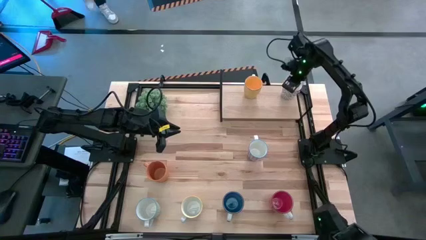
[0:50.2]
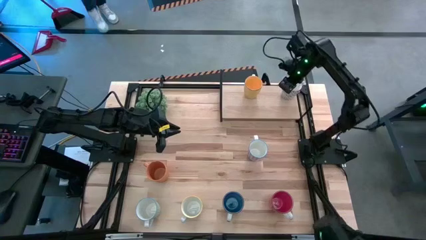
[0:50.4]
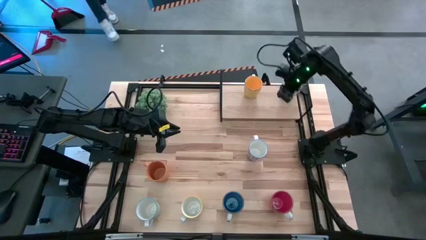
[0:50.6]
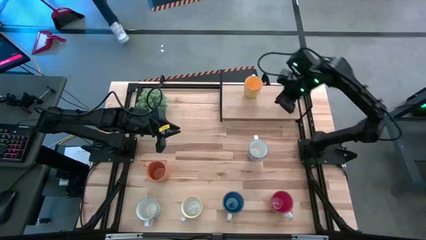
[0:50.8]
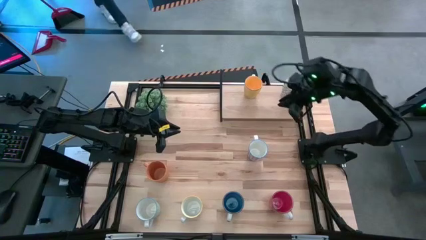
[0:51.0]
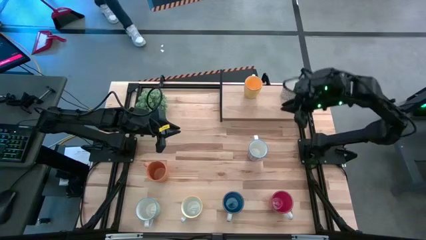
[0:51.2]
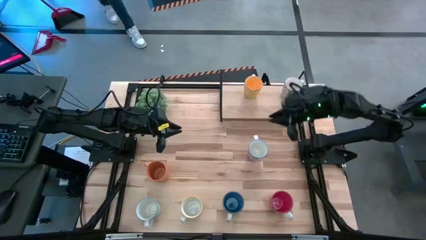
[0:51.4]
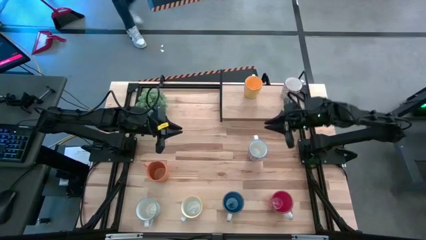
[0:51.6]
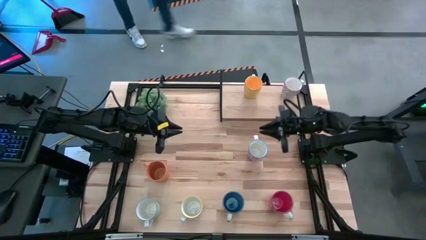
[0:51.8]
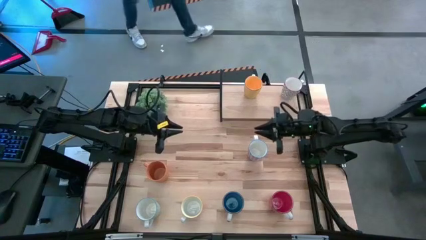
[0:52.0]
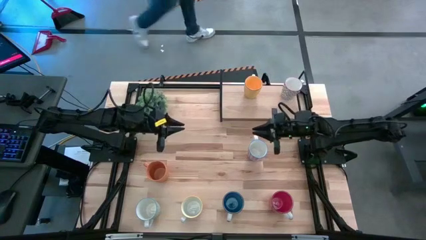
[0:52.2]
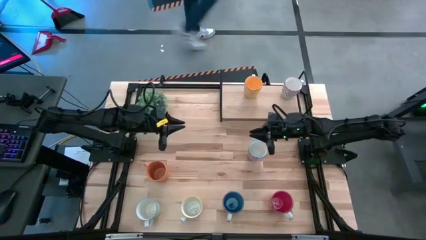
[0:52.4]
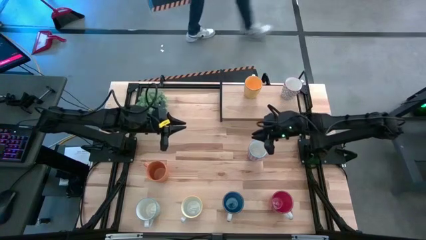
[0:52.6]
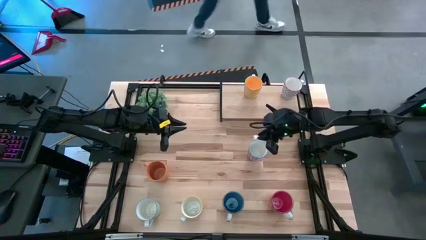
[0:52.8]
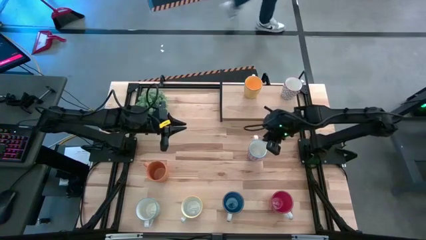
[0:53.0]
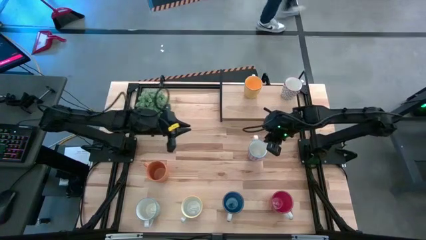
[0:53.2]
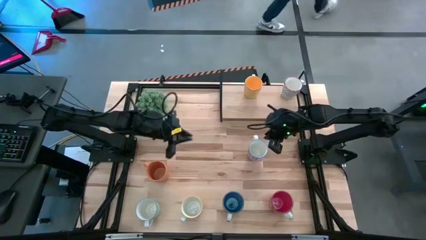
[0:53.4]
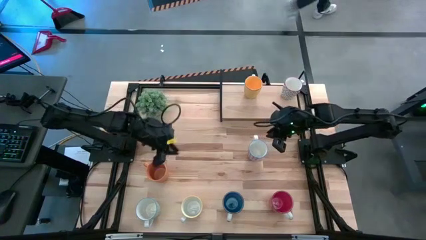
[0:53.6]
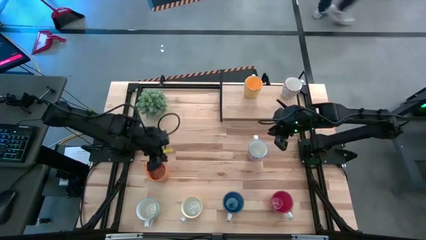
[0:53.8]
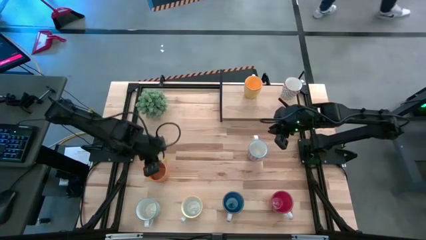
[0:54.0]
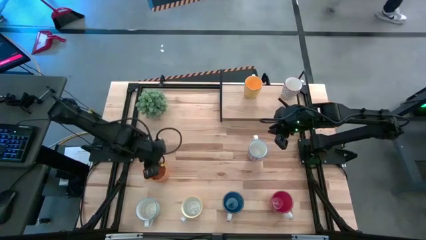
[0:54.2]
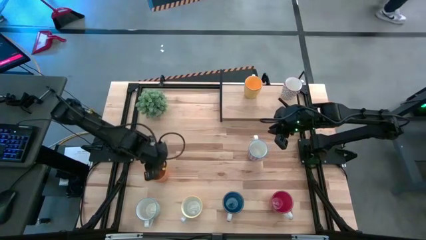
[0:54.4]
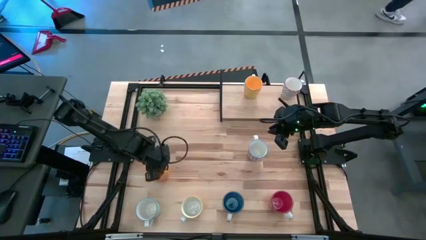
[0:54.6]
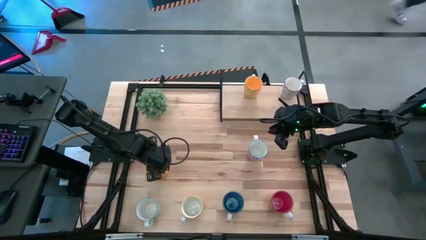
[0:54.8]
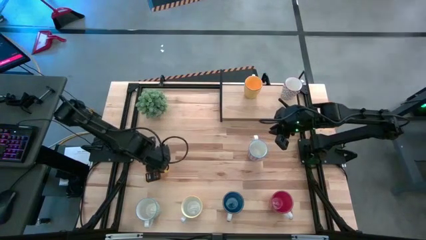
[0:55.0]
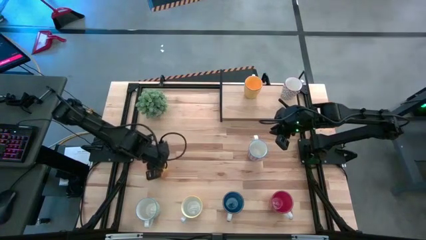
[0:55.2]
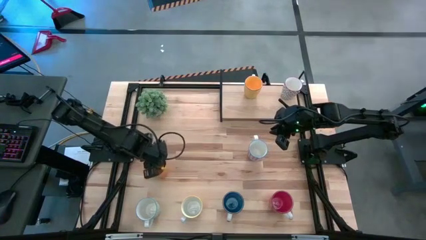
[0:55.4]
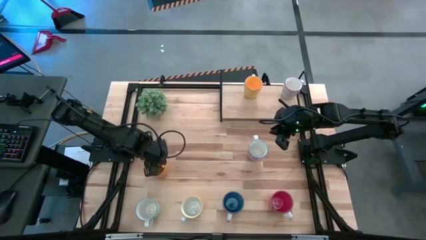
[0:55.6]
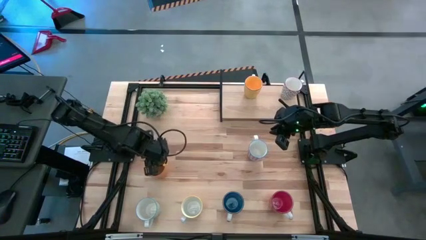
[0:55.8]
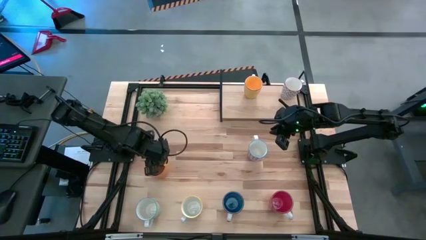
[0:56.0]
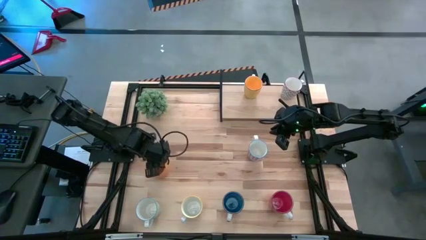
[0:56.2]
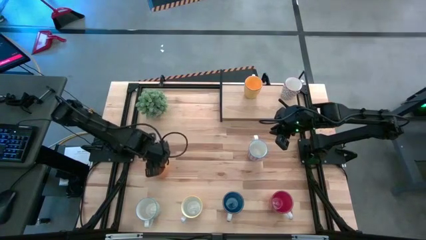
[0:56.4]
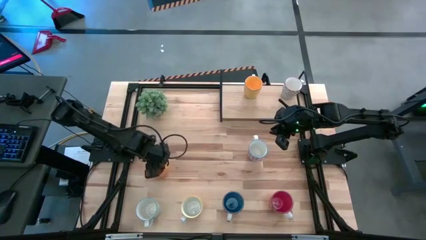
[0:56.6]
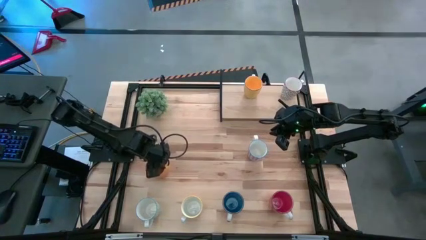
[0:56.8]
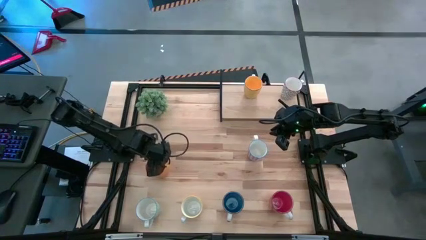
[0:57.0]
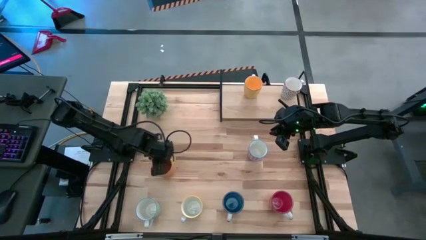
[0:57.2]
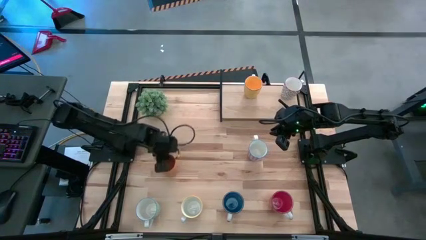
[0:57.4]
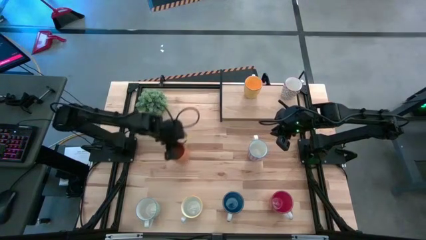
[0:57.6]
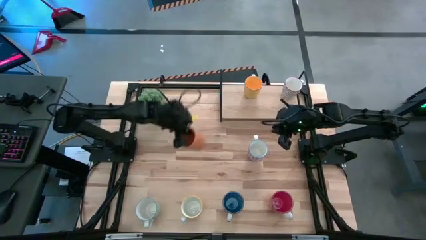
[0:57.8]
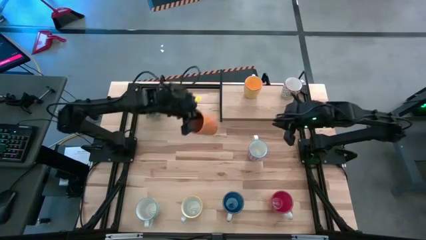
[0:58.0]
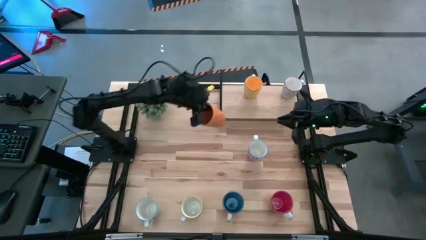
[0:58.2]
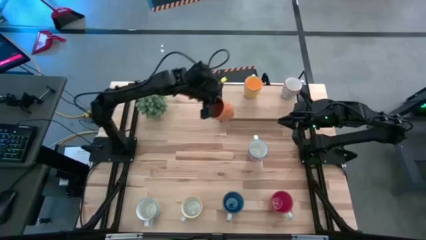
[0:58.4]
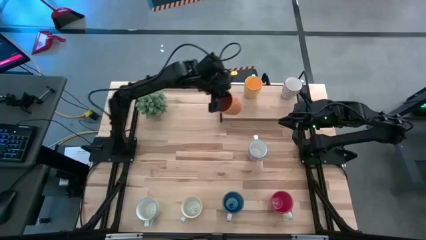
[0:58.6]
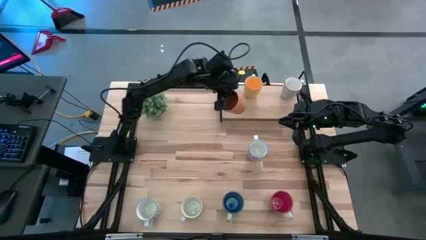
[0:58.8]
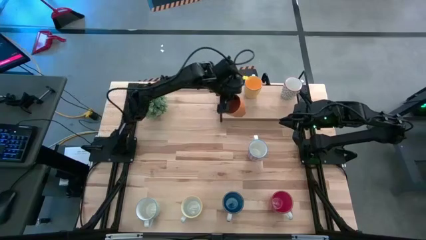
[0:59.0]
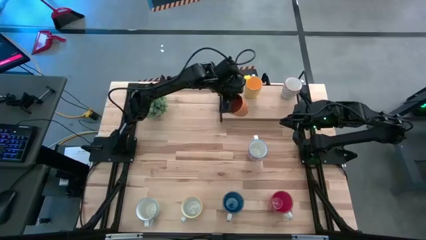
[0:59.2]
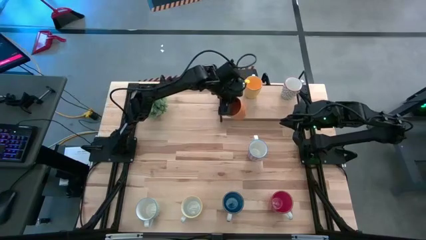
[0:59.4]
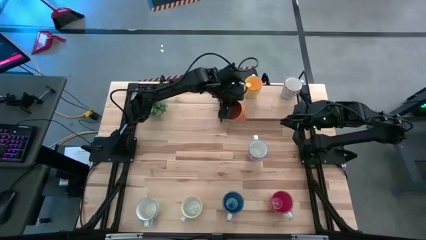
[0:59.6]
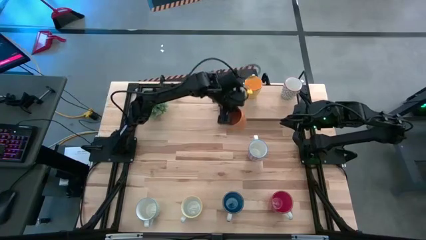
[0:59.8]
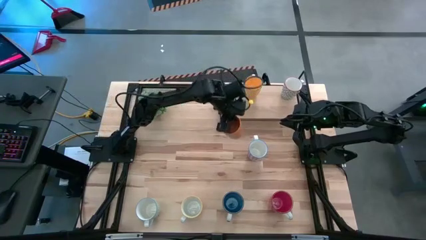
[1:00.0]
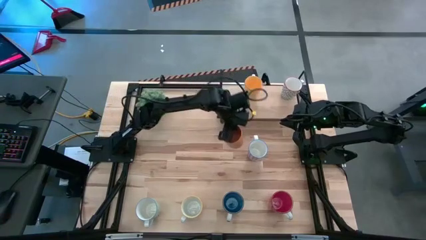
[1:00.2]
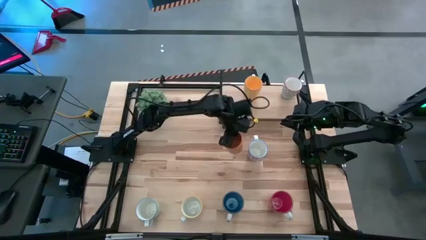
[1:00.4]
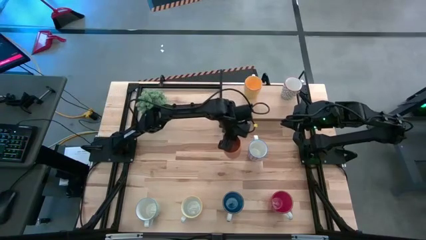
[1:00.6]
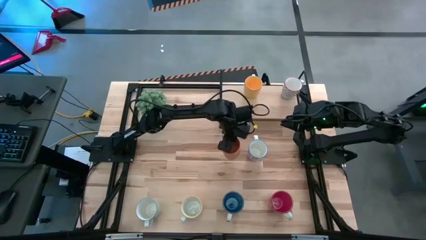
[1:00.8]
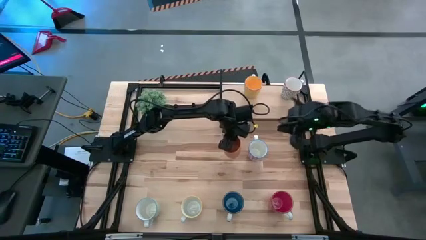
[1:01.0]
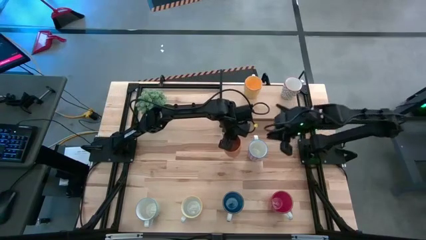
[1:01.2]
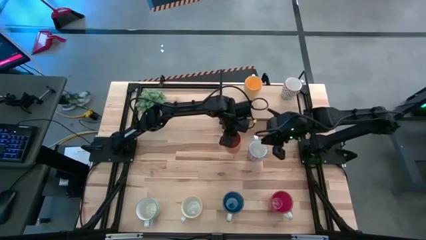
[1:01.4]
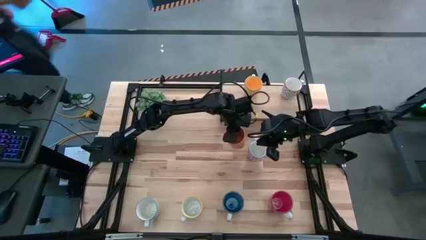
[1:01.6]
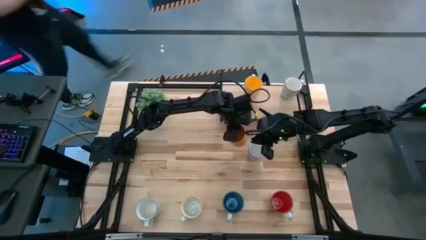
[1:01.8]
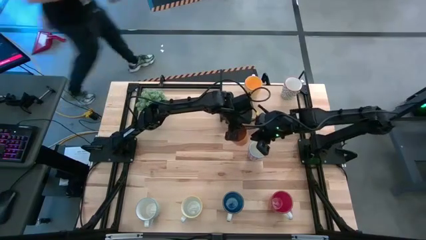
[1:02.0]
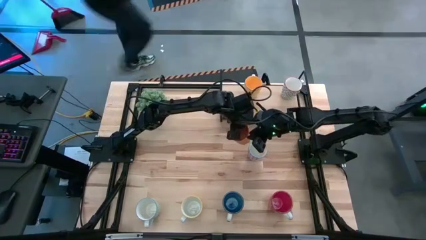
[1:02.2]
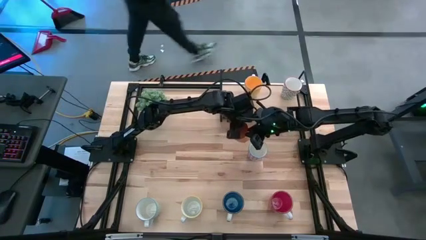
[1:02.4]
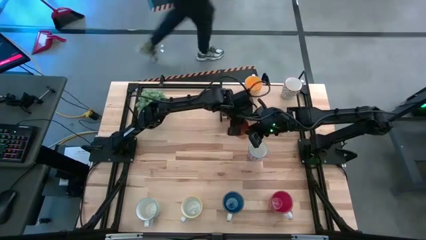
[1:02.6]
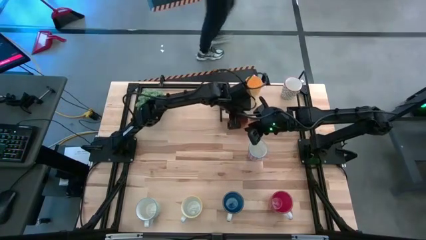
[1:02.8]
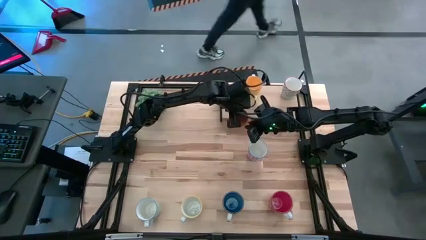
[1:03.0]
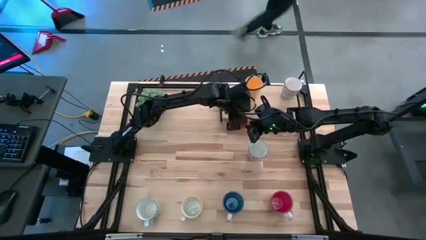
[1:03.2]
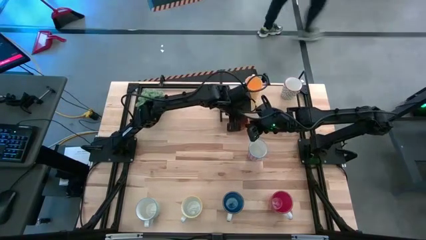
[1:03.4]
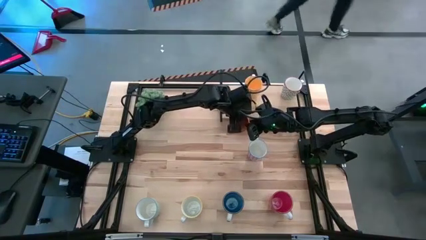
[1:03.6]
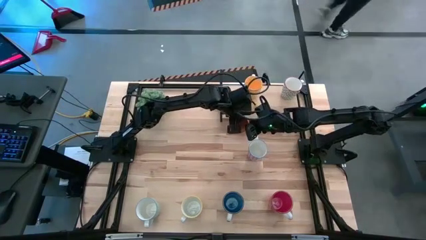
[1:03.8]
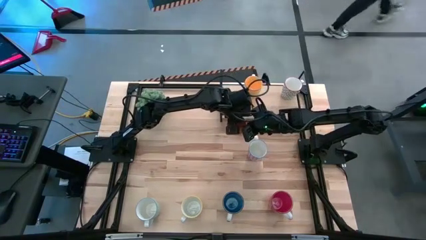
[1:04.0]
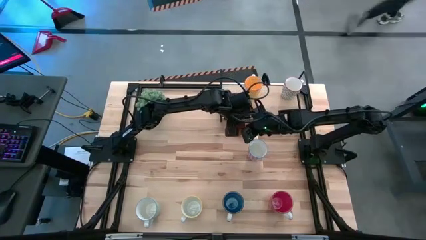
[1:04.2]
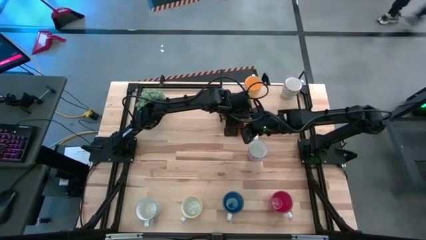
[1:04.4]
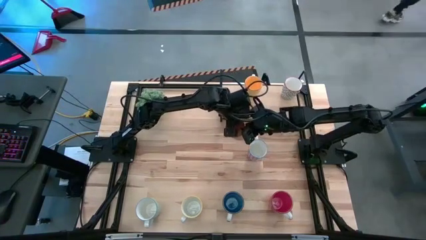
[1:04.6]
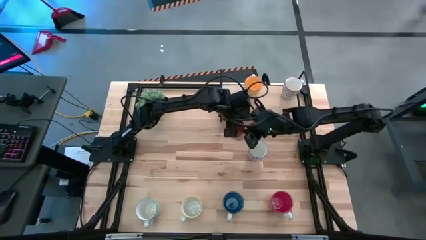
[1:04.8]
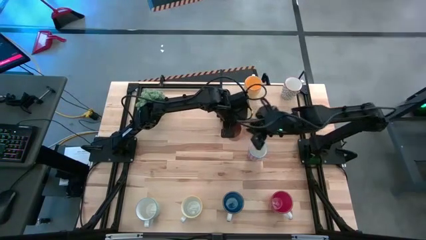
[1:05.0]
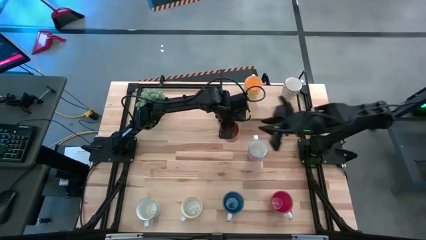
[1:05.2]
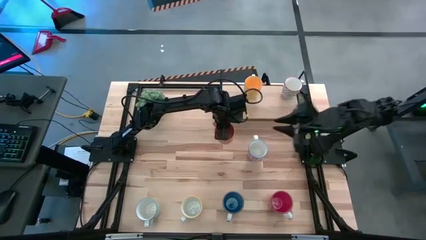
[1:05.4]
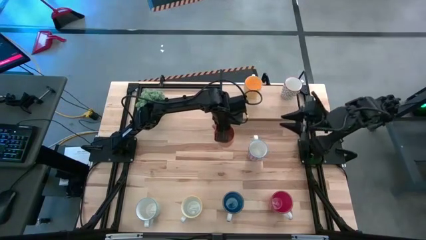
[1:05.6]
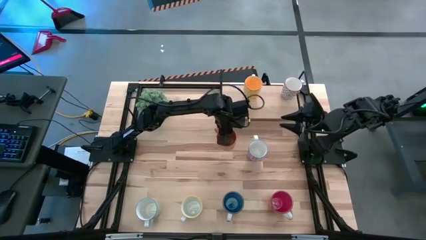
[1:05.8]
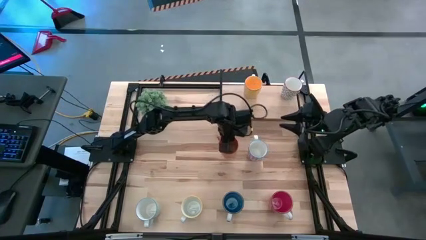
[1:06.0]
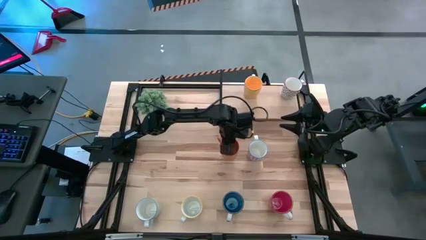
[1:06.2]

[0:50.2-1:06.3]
Task: Place coffee mugs
Put the orange mug on the shelf
